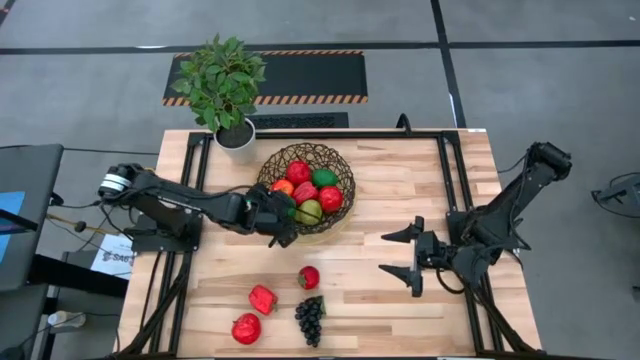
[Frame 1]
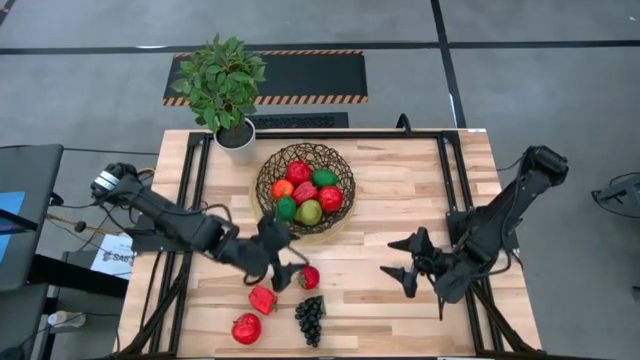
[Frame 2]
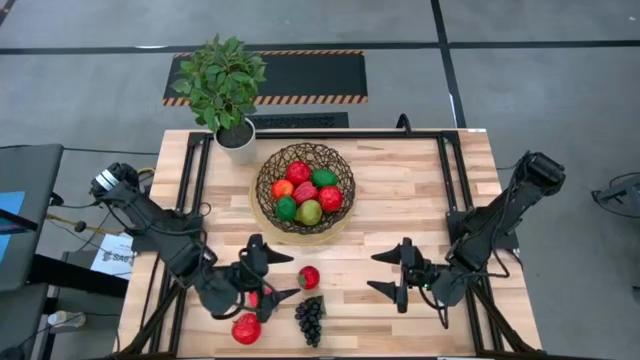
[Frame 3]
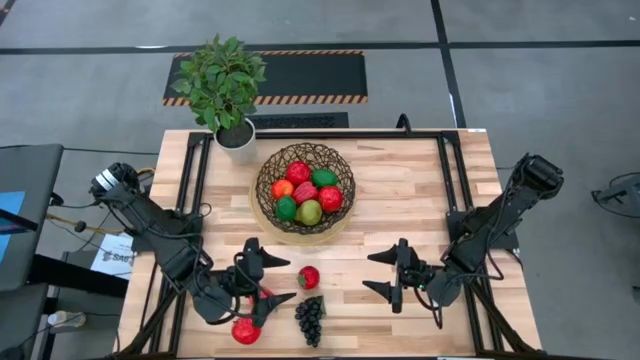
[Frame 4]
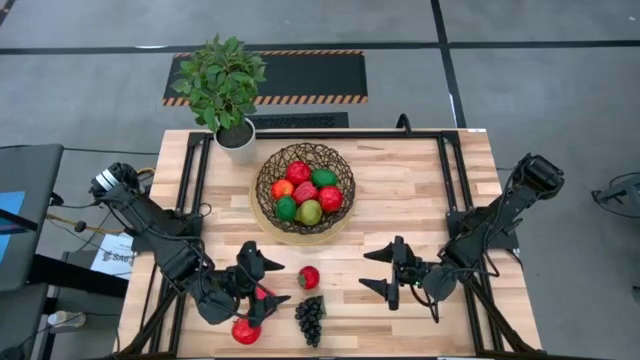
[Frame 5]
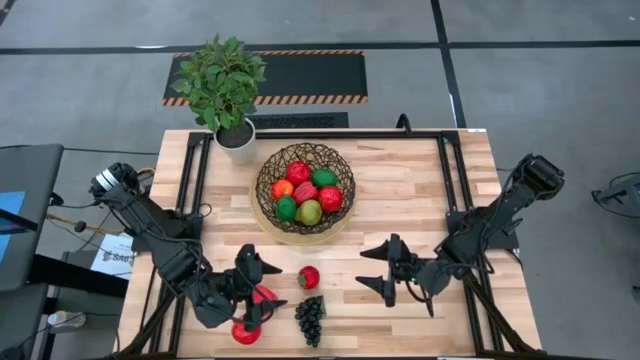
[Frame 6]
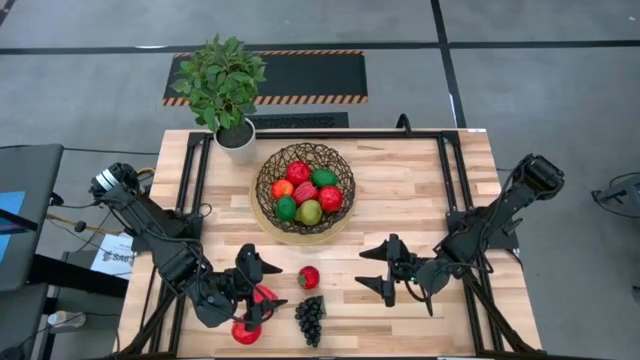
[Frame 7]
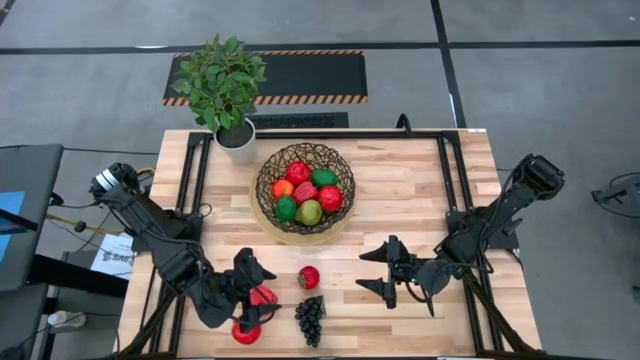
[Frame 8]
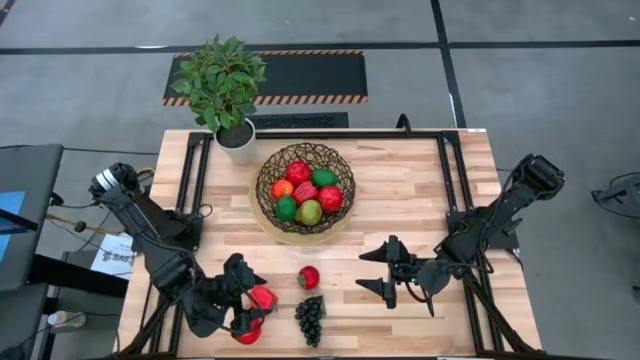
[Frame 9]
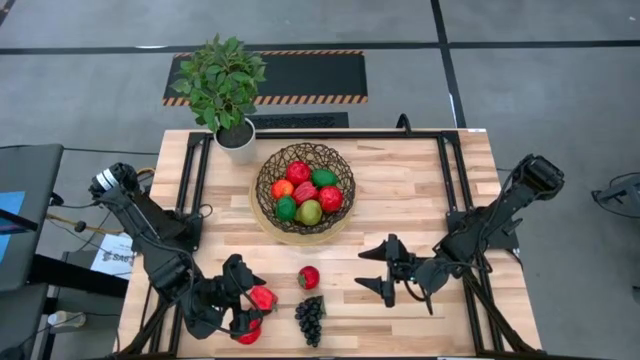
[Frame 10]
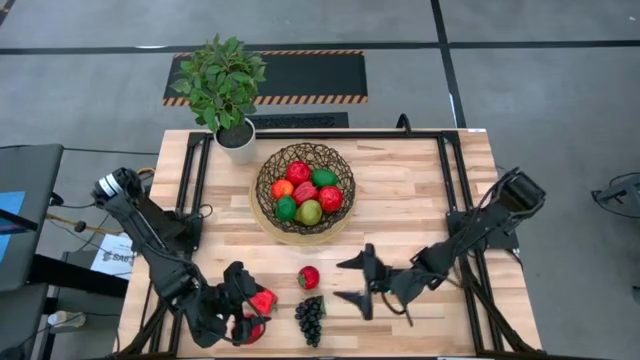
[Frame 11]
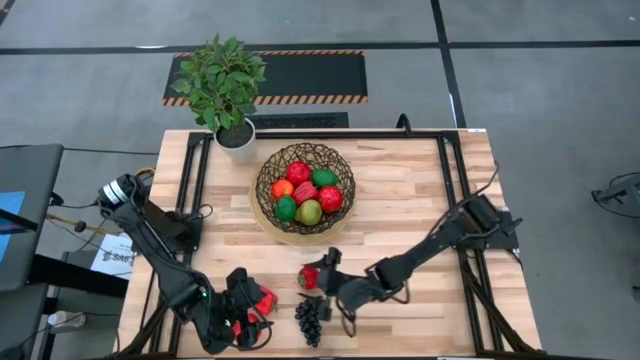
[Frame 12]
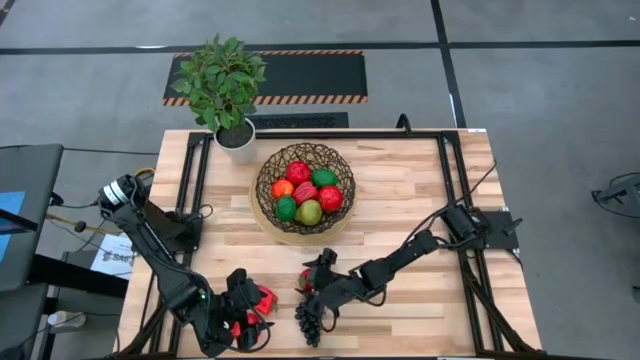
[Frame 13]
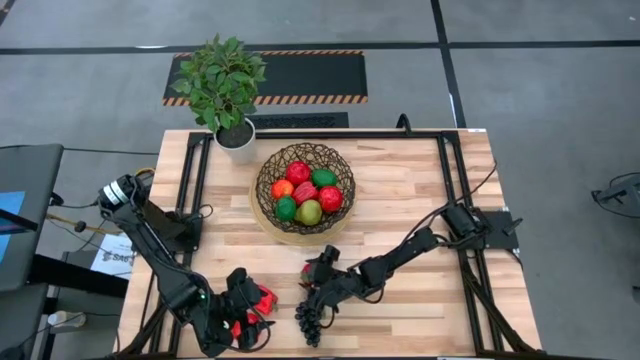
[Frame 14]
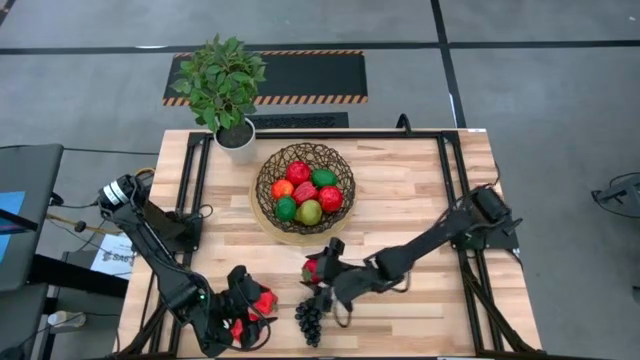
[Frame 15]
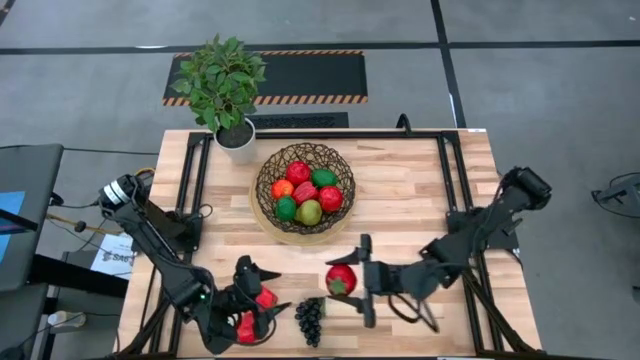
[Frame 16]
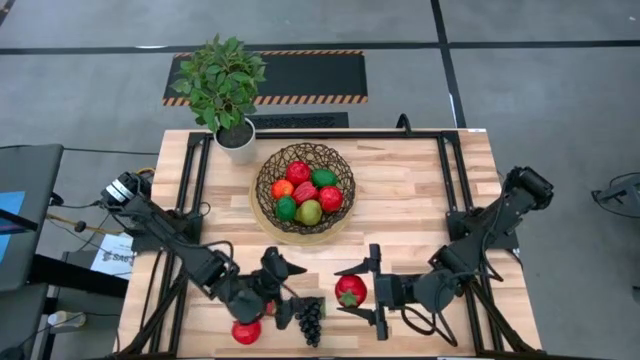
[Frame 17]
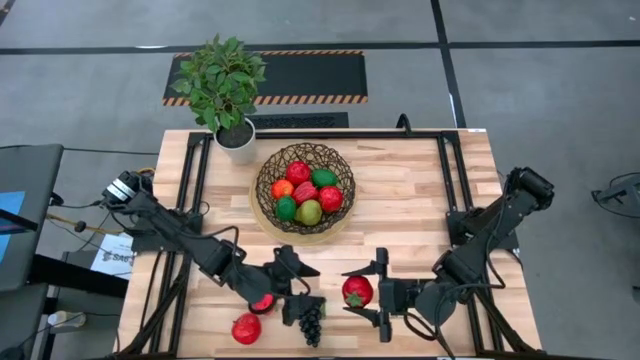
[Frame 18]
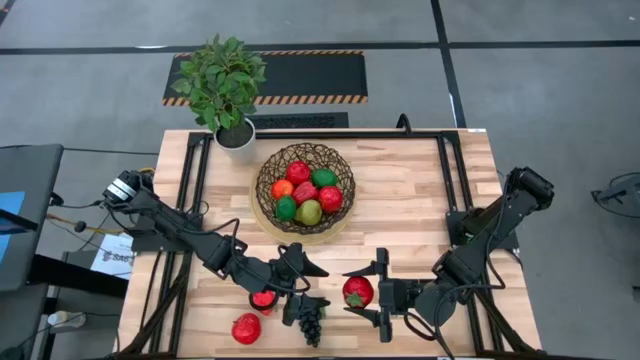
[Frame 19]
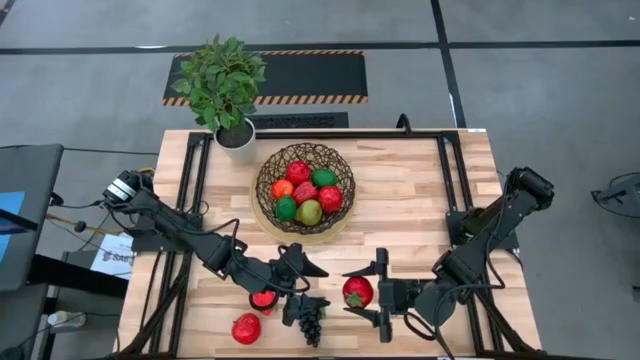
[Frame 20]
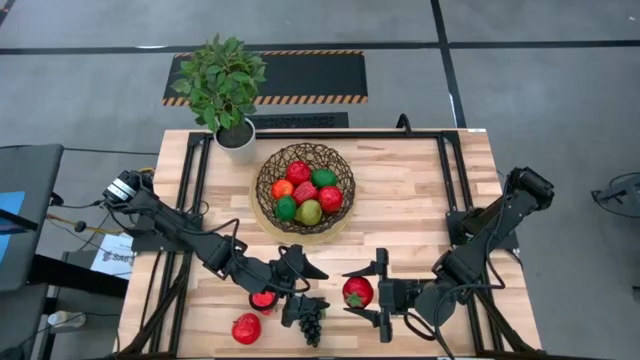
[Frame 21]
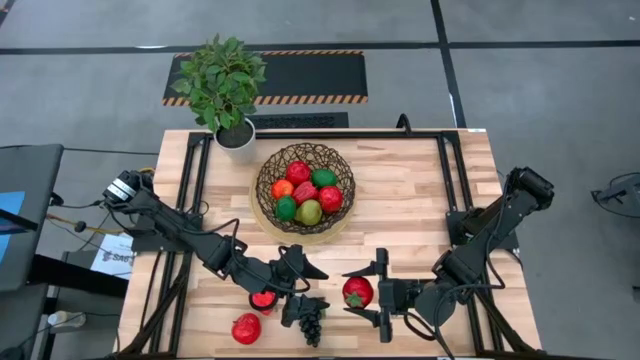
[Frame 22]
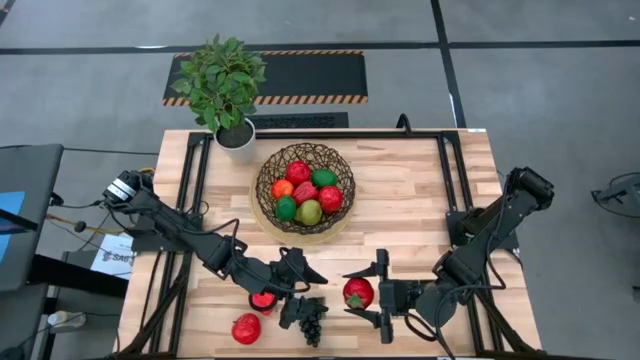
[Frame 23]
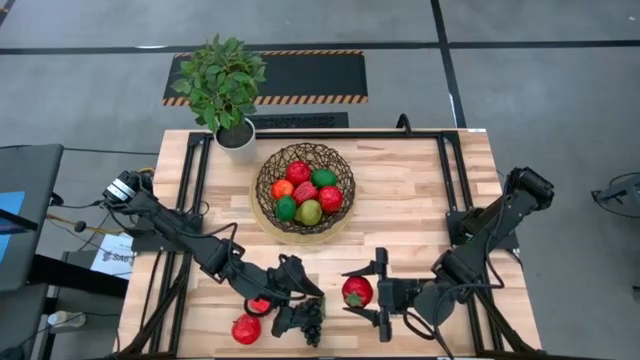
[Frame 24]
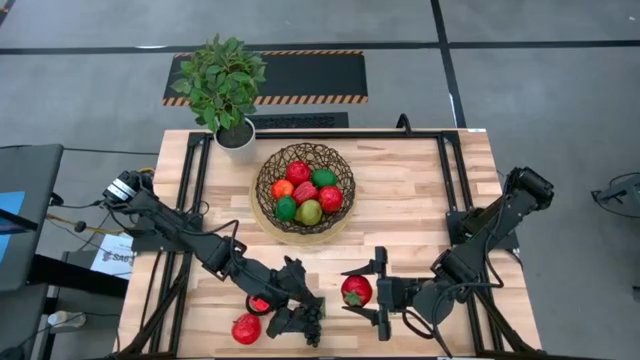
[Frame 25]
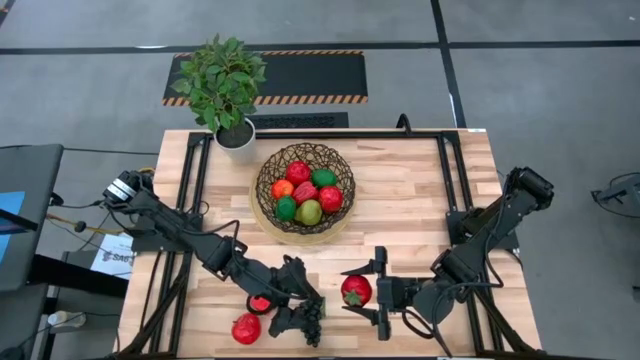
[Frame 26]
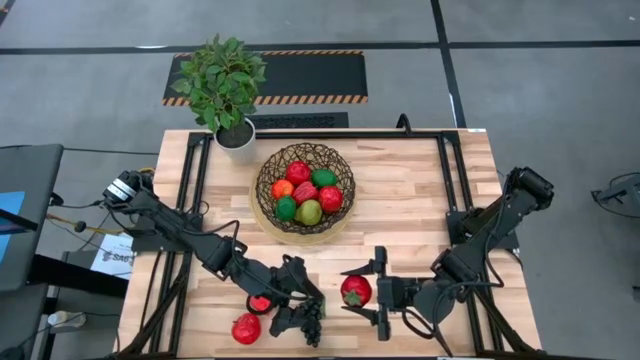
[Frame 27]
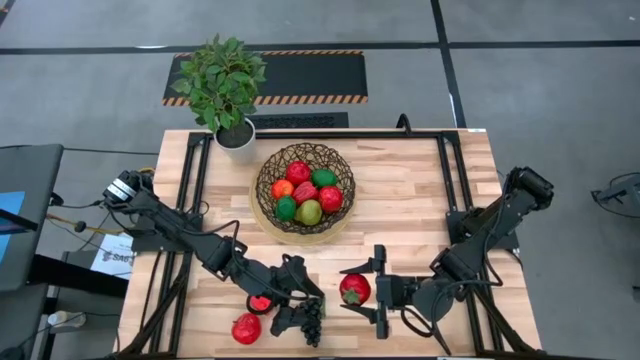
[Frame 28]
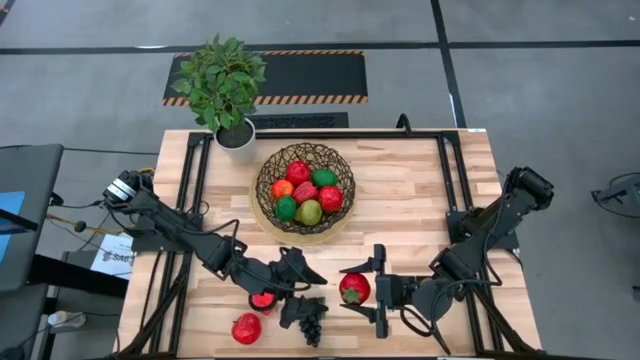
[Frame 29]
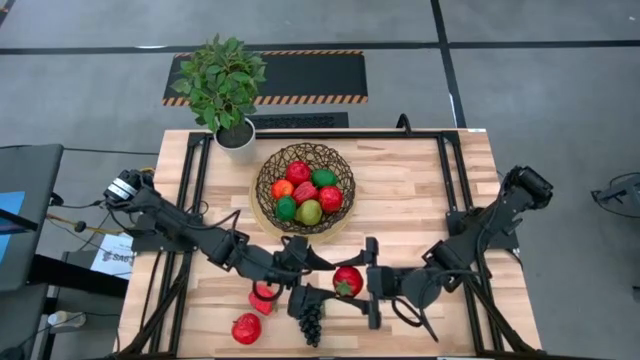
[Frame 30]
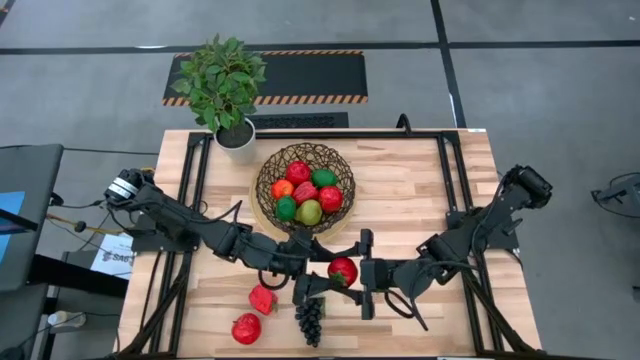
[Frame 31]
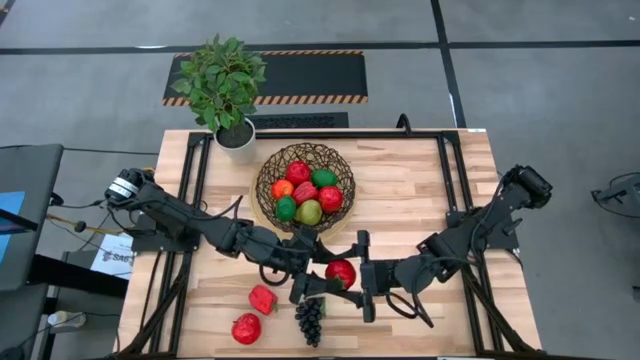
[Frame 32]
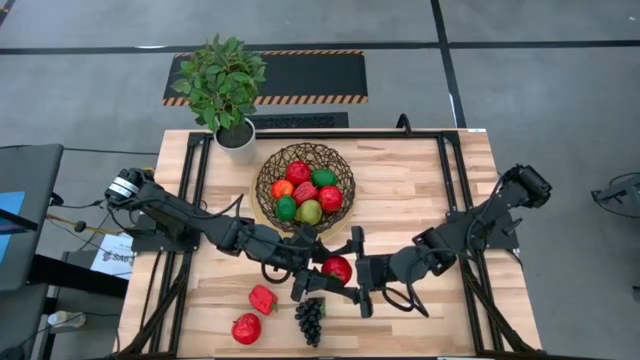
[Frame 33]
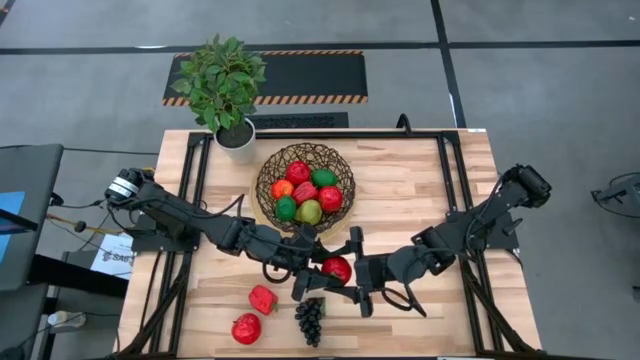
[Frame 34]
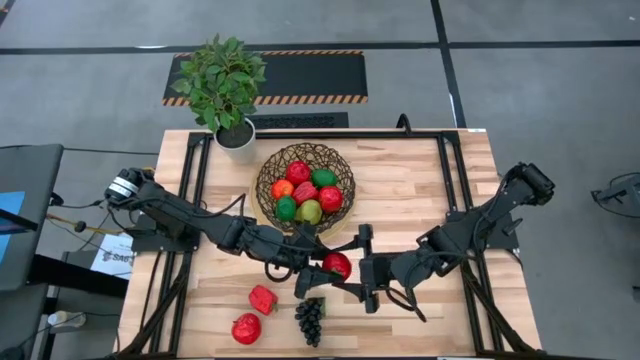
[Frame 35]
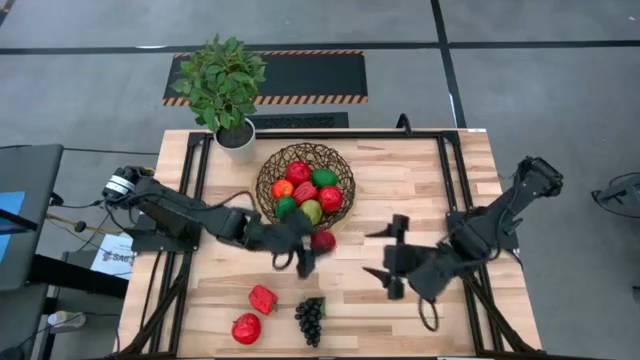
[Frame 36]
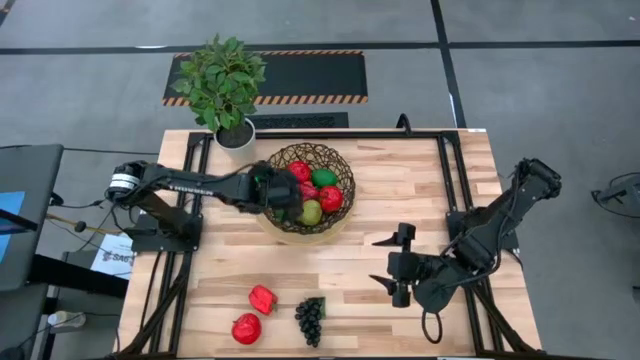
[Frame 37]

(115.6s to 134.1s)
Task: Build produce basket
Put the red tomato into the basket

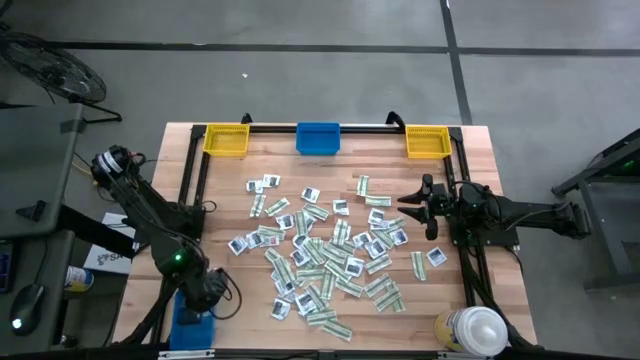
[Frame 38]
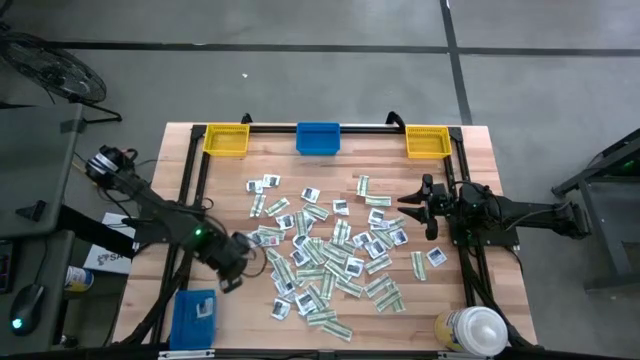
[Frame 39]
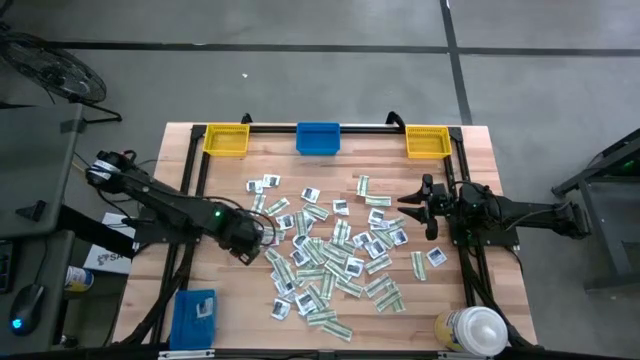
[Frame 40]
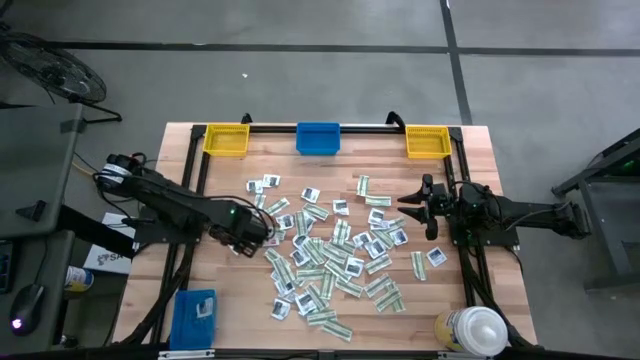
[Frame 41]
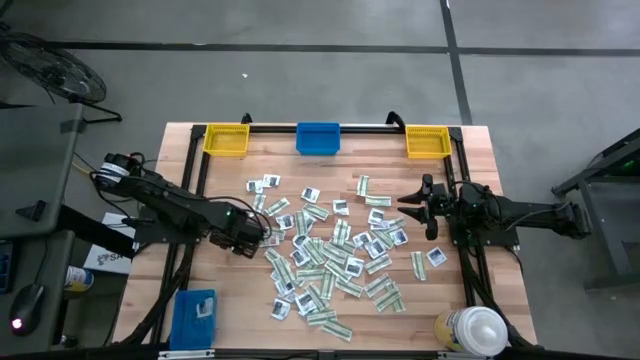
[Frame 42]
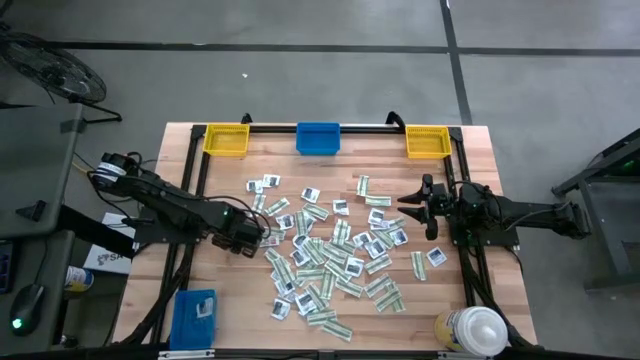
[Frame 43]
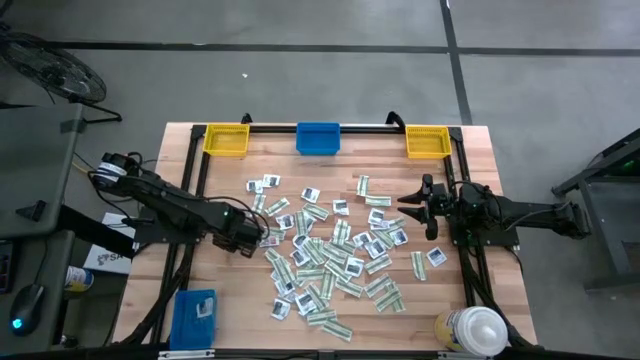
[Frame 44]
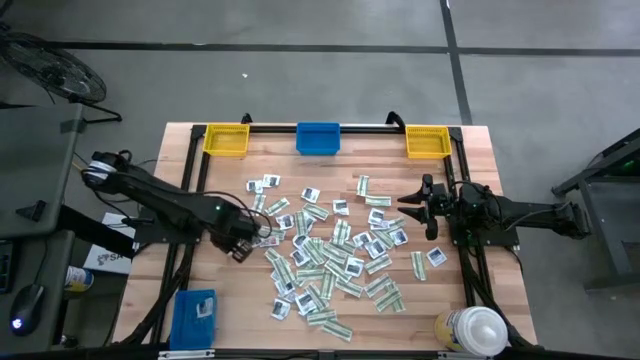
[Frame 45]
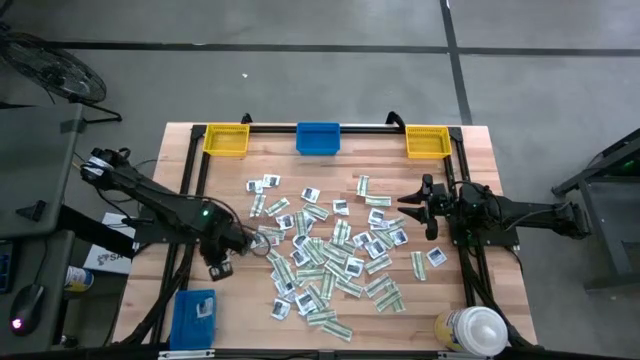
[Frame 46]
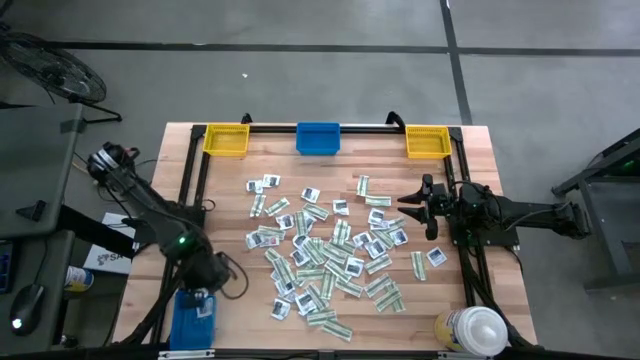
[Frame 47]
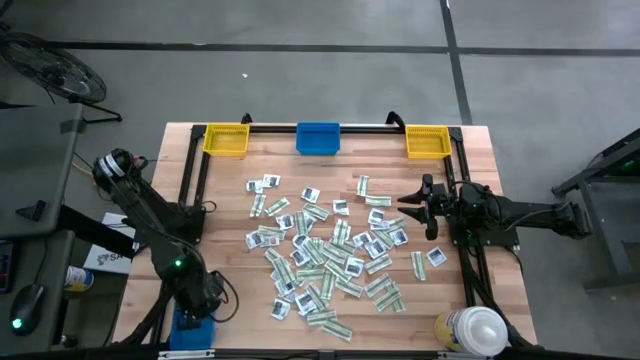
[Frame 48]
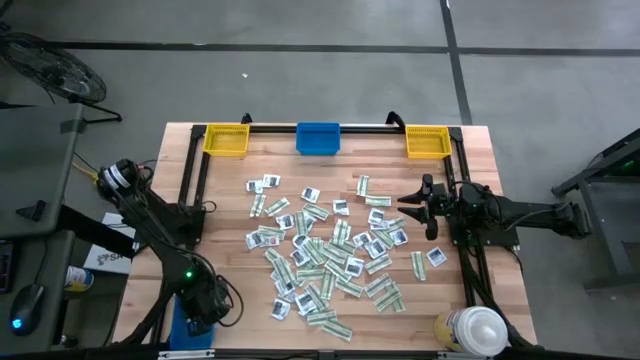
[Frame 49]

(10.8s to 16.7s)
Task: Pick & Place First Aid Supplies
Put the blue alcohol pad into the bottom blue bin
